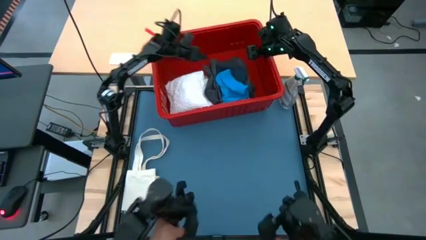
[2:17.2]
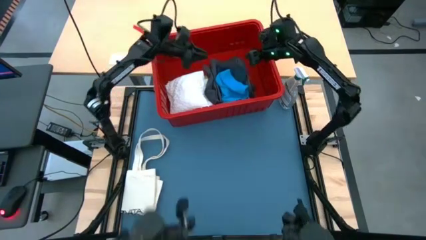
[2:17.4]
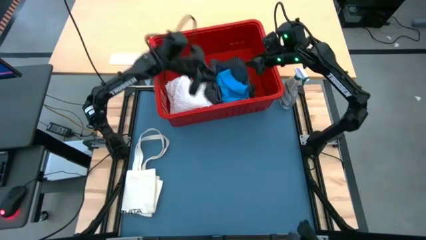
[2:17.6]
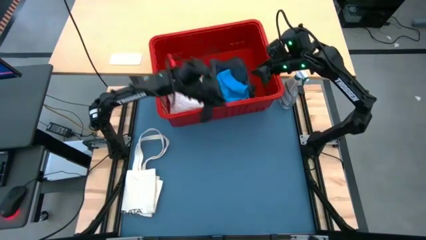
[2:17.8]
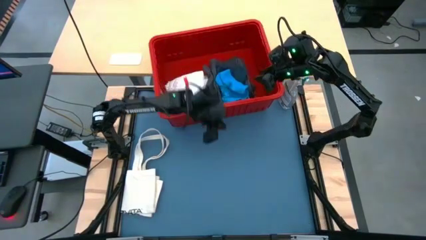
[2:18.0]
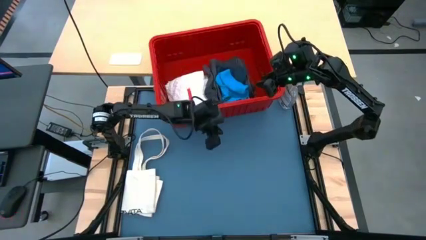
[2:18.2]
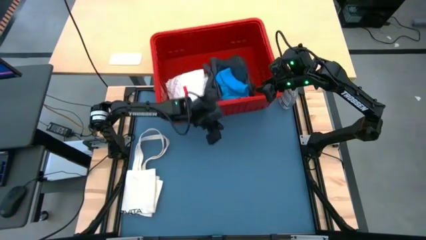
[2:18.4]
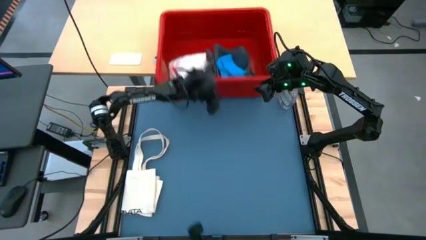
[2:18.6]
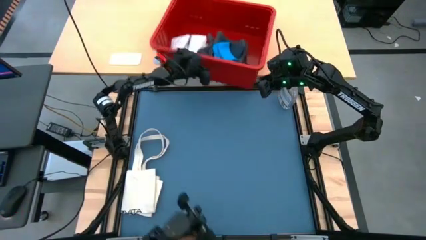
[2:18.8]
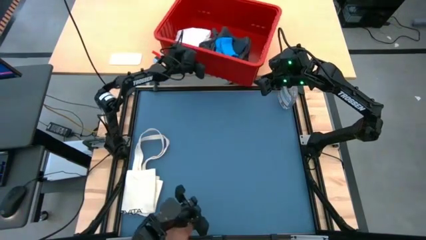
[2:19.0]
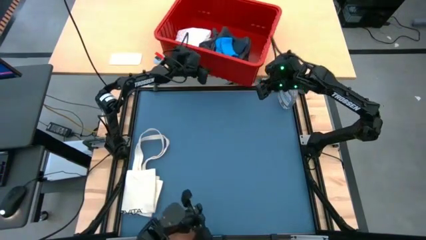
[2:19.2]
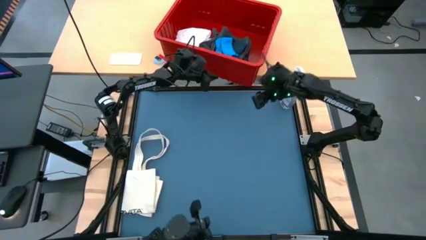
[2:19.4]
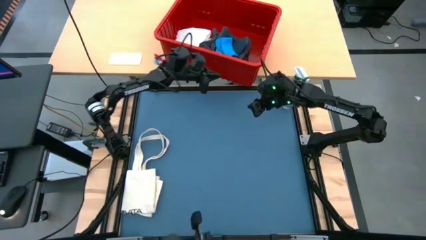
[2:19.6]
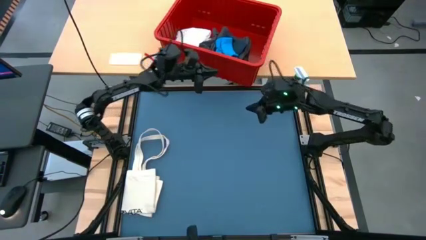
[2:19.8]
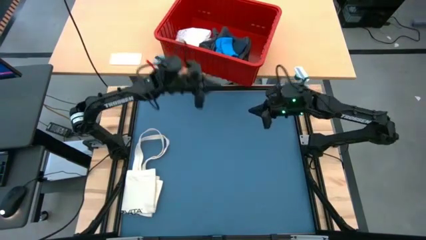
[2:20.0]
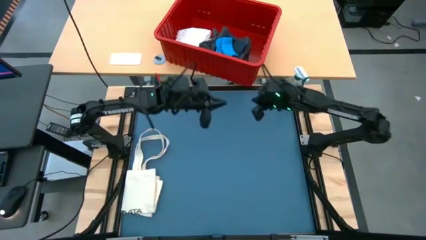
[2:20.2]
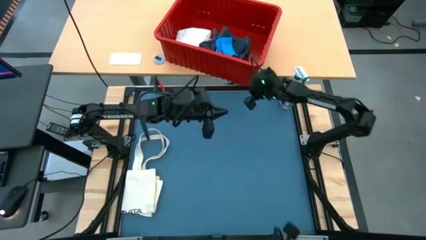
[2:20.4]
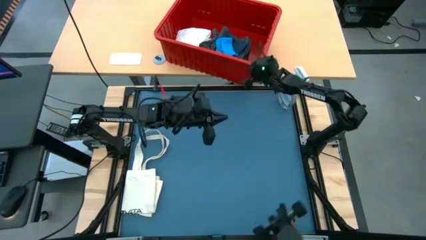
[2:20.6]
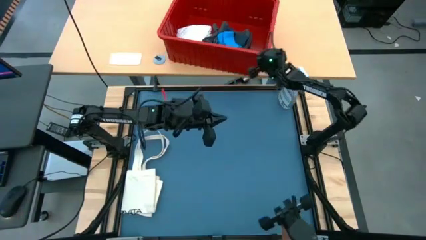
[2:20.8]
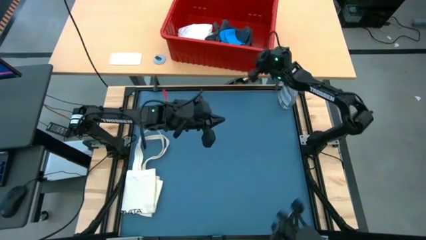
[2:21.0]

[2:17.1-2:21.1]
Task: Fold Laundry from Bin
Move the bin to the other table

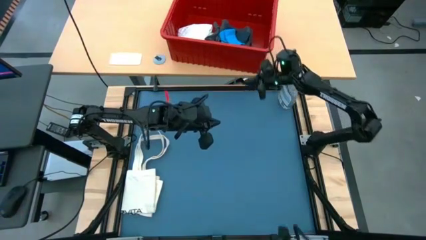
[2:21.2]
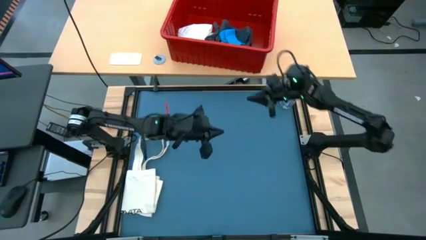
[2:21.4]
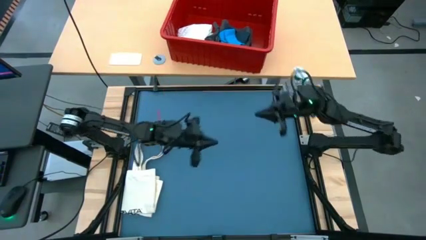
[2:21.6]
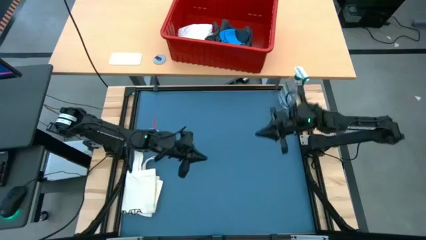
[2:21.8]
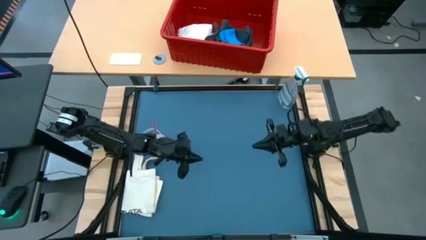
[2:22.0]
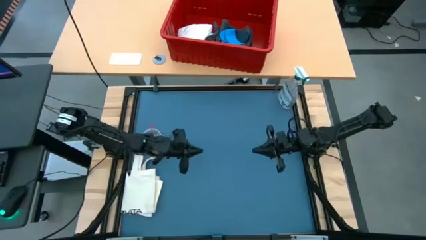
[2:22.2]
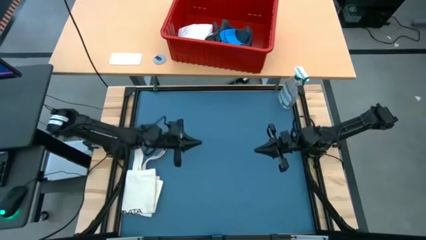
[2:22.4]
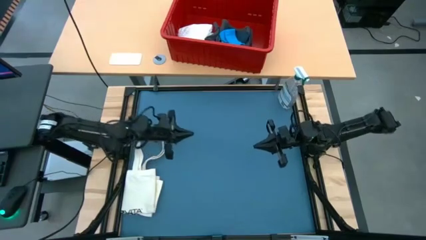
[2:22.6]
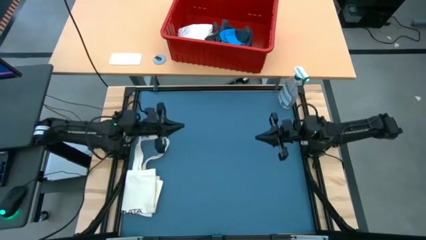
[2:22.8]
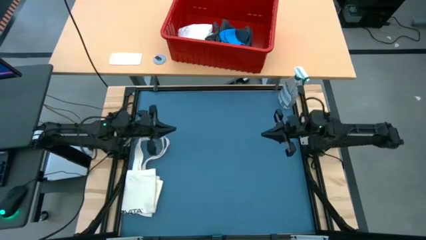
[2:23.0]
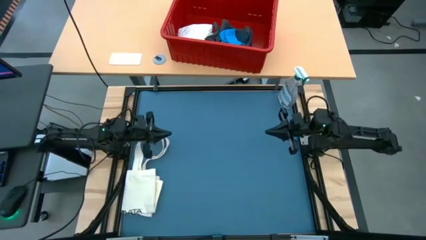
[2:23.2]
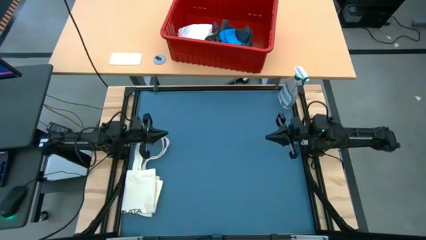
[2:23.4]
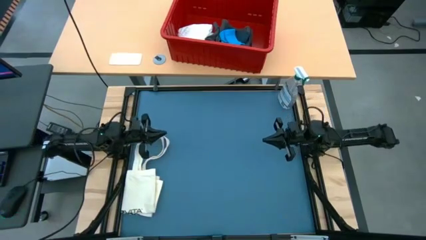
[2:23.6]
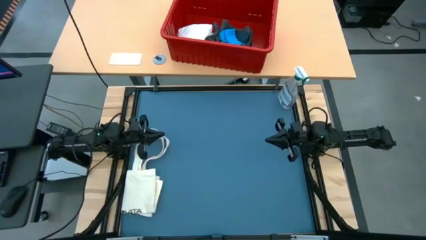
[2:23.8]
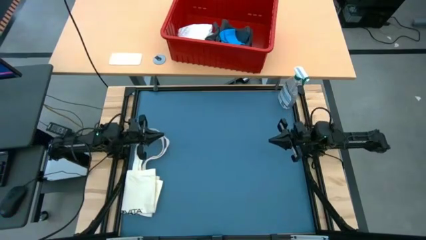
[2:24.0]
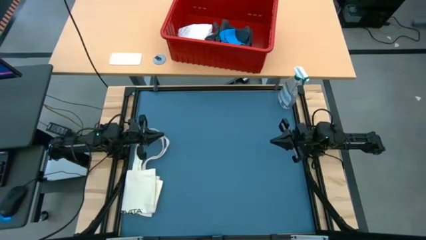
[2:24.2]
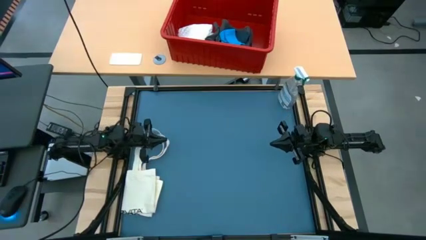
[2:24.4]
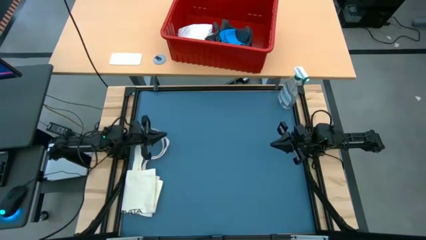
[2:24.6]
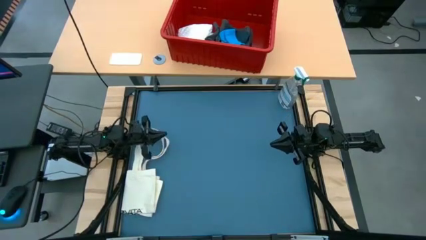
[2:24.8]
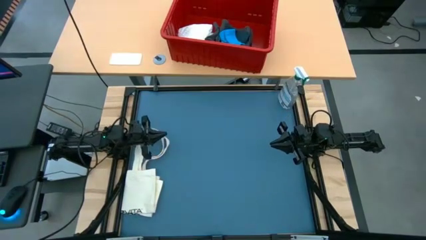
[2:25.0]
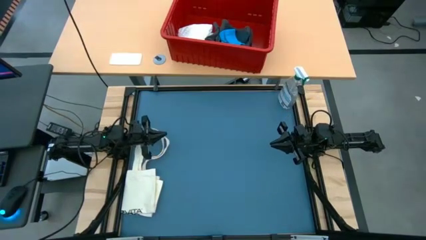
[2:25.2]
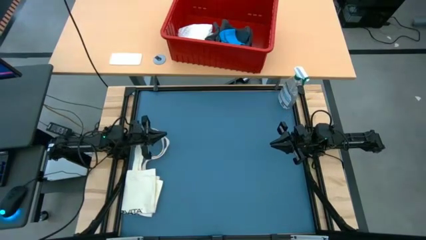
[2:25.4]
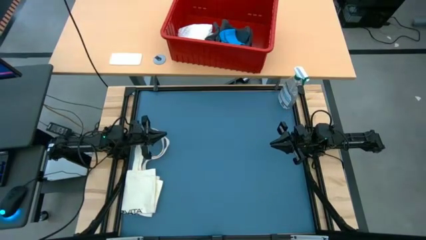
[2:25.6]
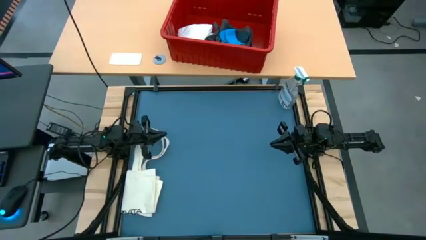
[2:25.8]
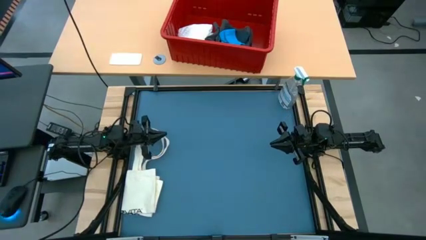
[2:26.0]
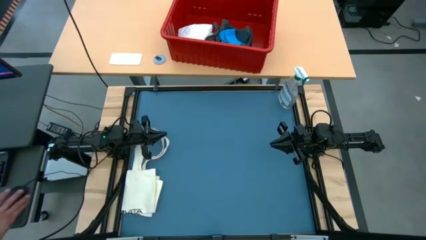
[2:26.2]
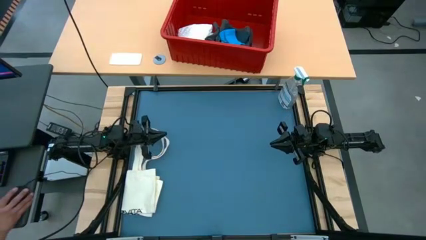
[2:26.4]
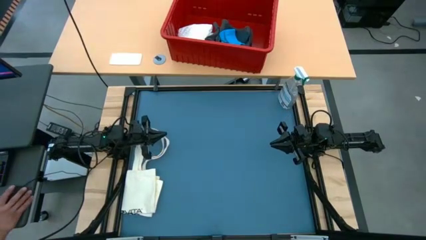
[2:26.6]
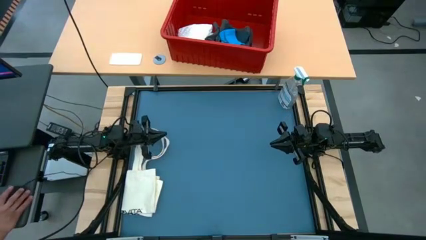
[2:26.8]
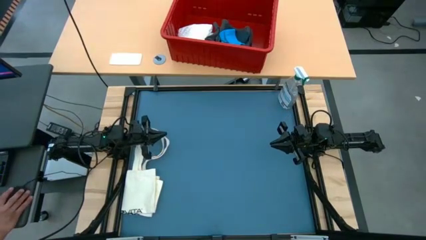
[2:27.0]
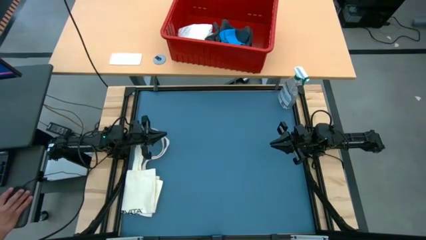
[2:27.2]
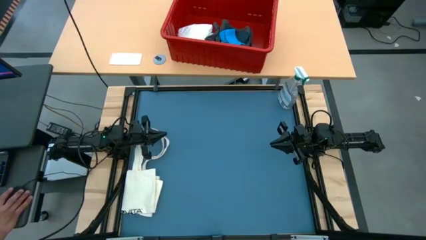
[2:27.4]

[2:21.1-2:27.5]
Return to Home Position
